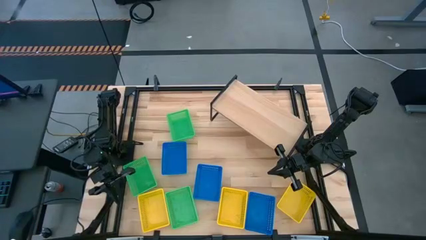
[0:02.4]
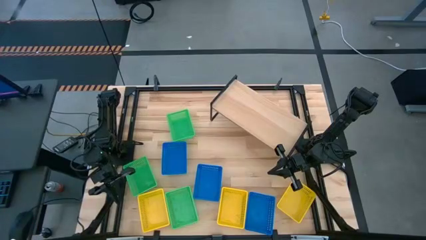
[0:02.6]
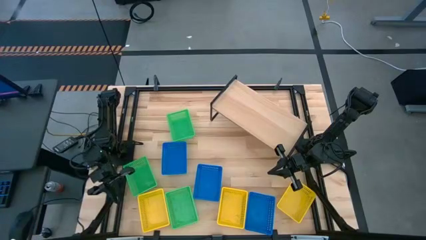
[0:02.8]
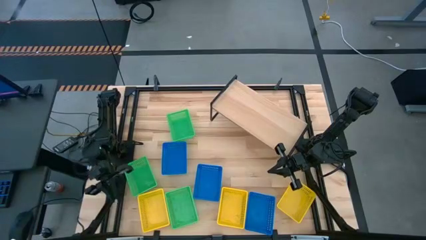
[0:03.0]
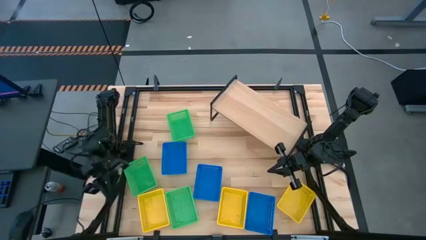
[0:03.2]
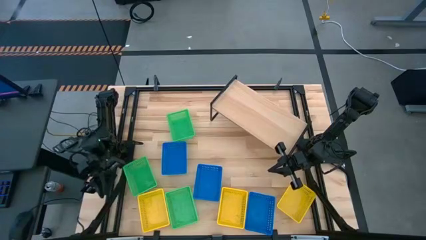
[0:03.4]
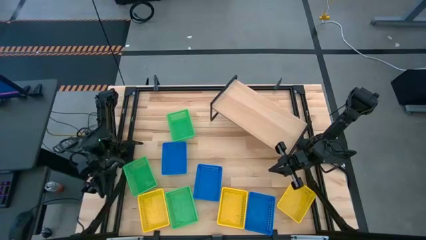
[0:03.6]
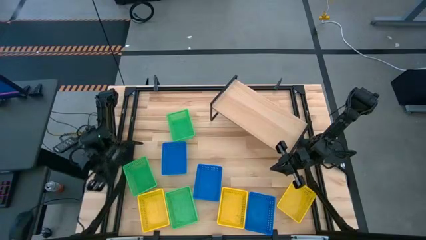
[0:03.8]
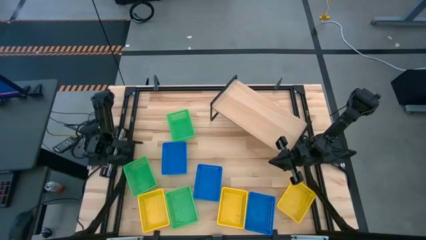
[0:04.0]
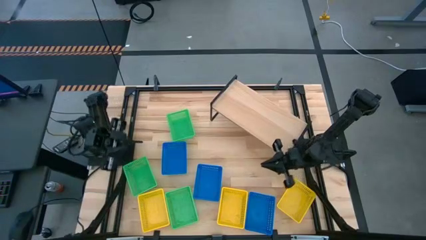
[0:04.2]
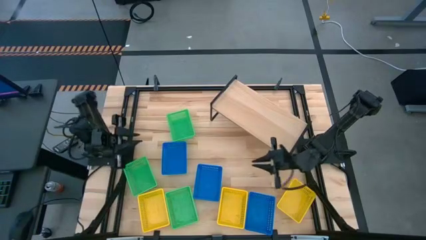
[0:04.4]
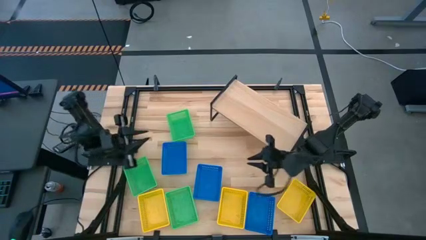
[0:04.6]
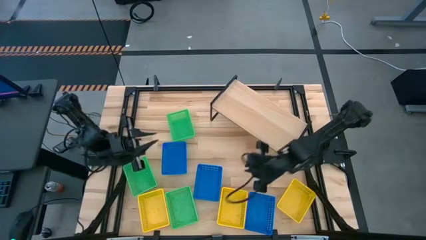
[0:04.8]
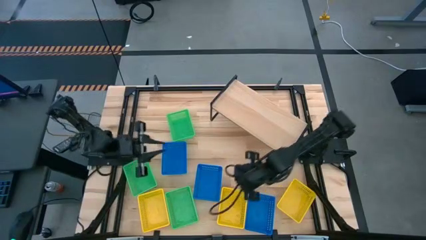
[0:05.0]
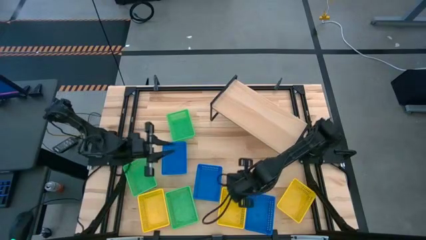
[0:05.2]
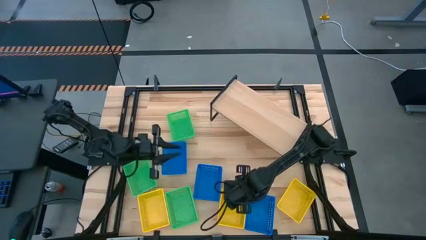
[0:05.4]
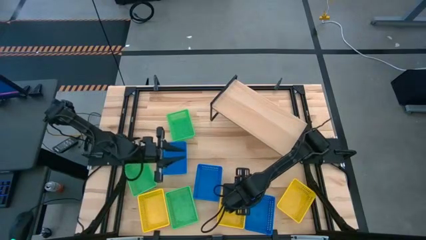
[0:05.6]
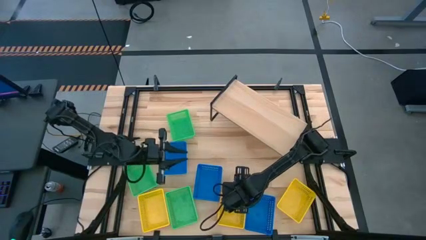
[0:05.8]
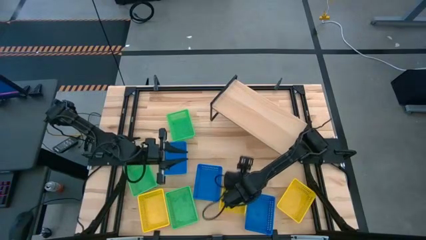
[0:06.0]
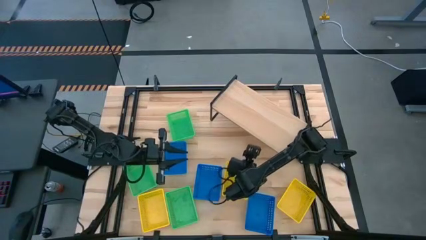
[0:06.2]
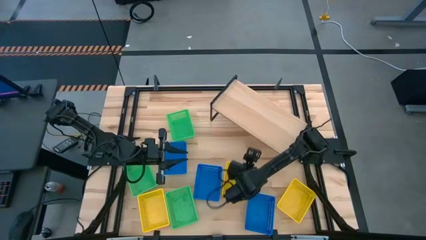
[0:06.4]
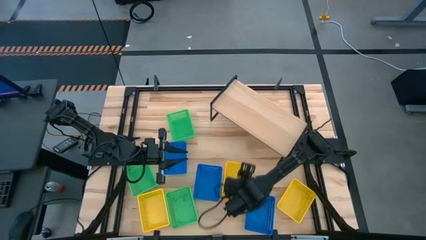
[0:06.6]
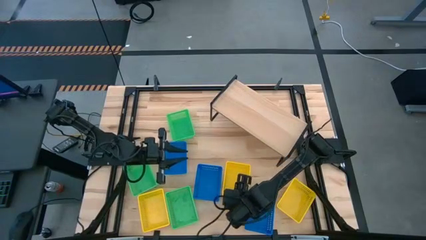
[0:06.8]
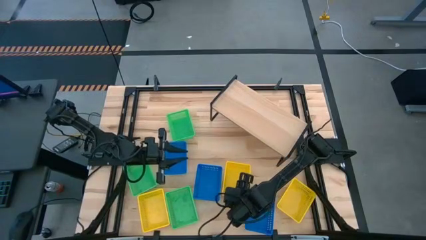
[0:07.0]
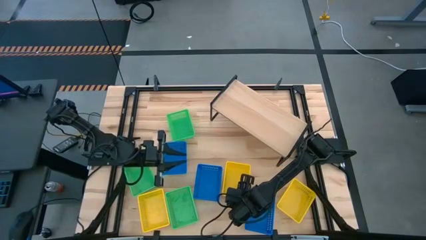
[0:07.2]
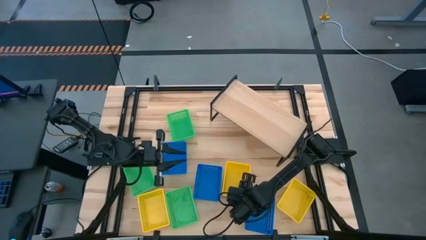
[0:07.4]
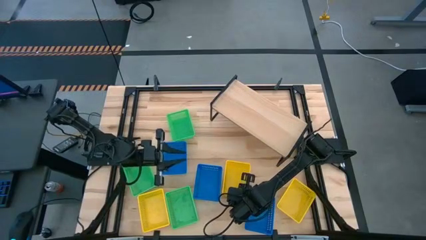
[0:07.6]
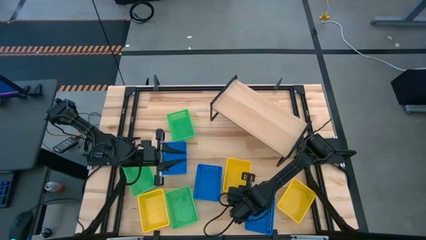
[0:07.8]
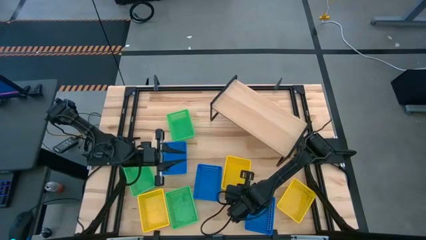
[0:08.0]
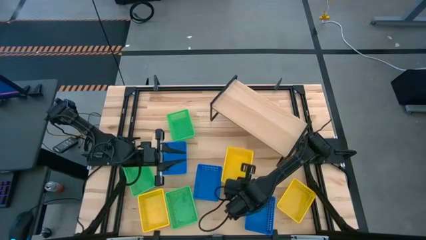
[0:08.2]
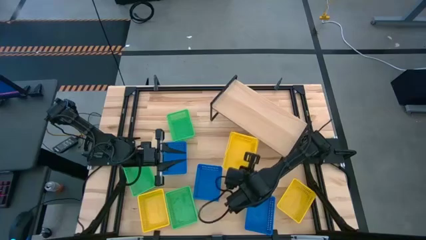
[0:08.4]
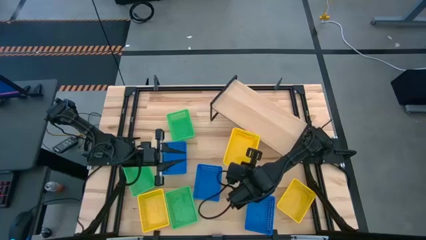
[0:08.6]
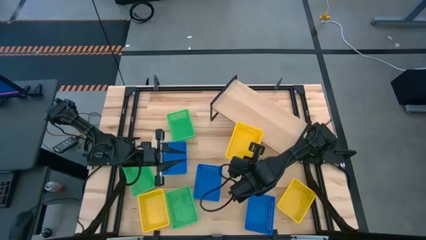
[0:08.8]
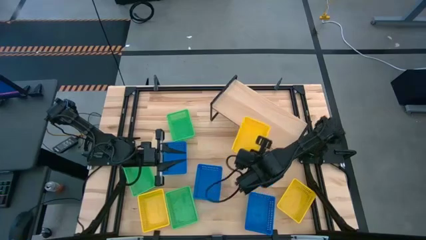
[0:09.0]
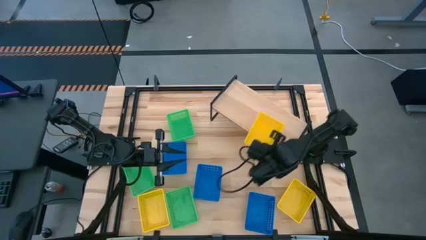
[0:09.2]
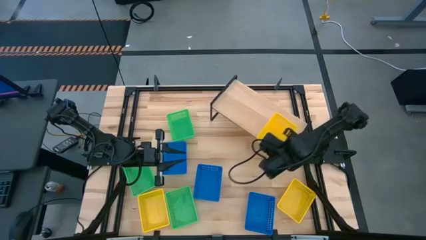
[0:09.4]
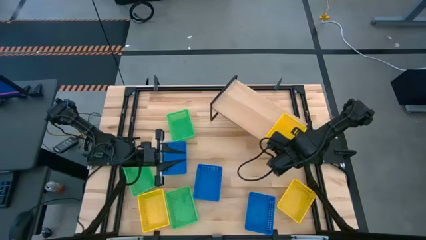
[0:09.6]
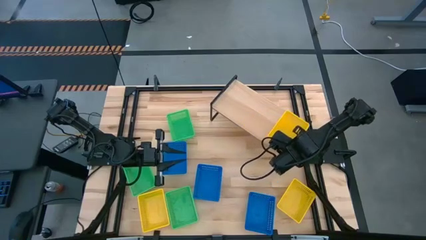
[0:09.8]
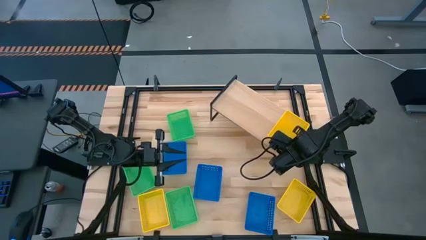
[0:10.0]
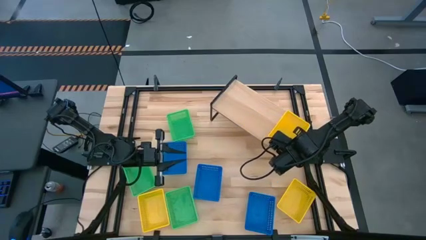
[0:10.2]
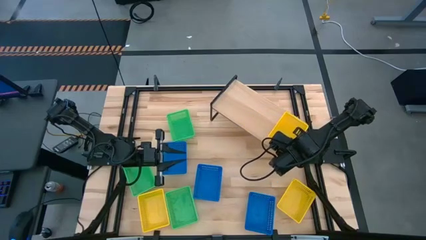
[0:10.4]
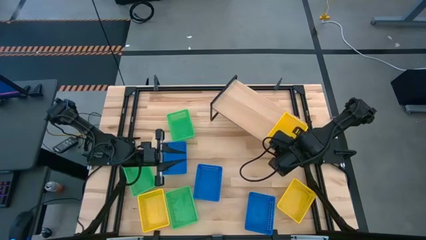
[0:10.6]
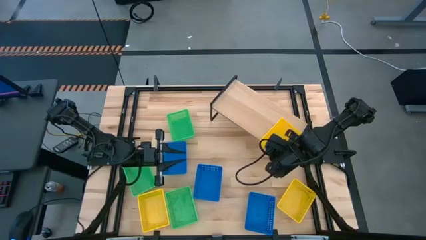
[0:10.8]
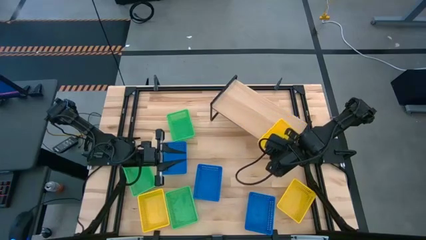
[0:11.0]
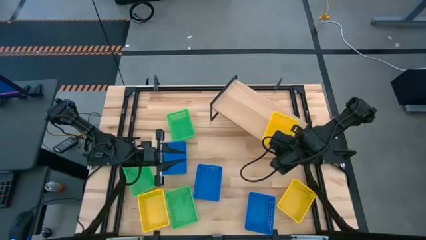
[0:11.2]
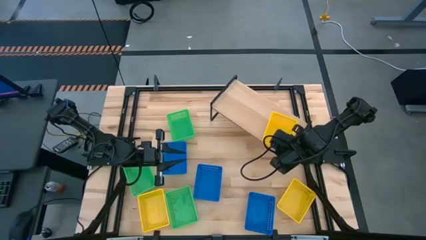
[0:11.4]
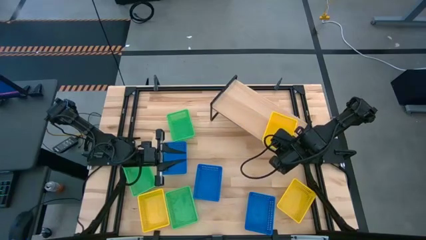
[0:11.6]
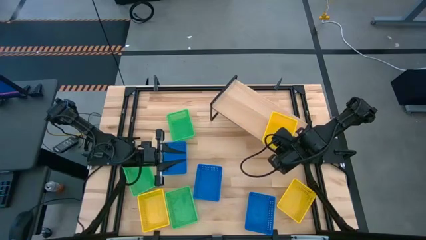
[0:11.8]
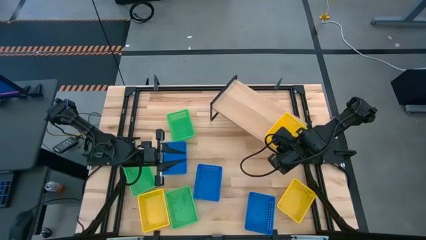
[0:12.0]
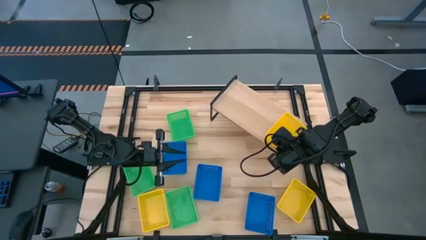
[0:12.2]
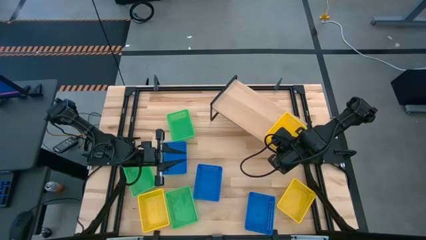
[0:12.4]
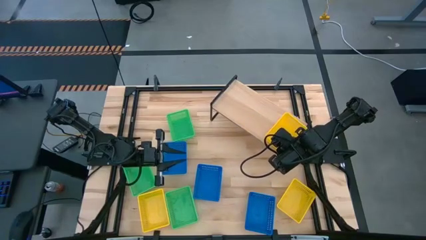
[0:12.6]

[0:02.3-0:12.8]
Task: Stack baskets on shelf by color
Put the middle yellow bin on the shelf

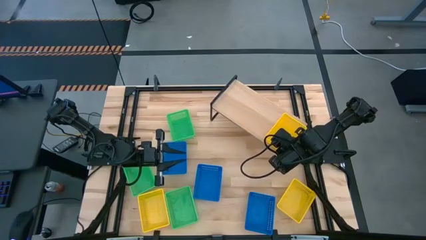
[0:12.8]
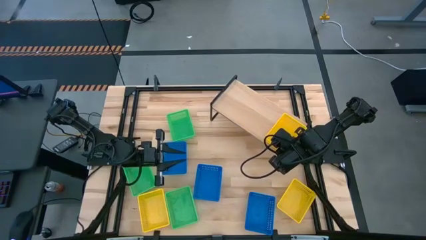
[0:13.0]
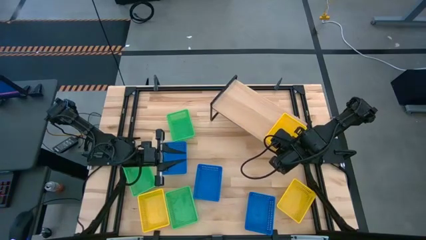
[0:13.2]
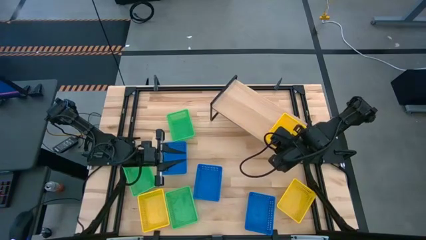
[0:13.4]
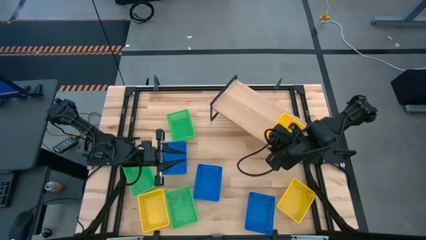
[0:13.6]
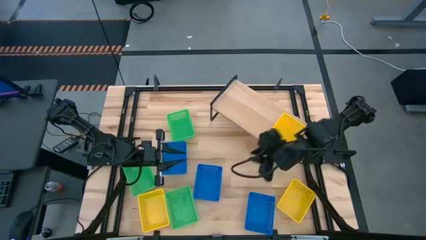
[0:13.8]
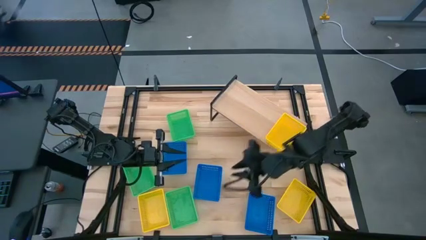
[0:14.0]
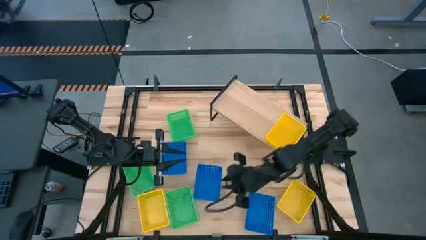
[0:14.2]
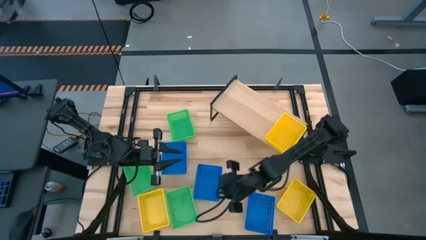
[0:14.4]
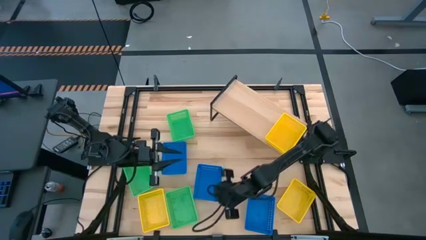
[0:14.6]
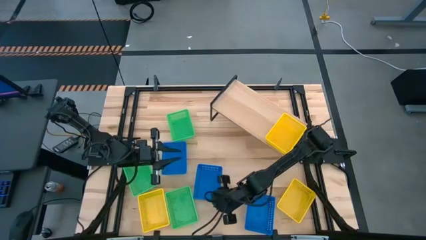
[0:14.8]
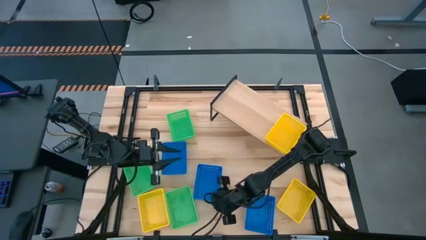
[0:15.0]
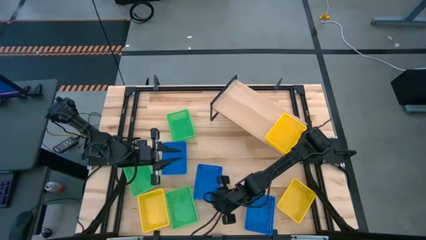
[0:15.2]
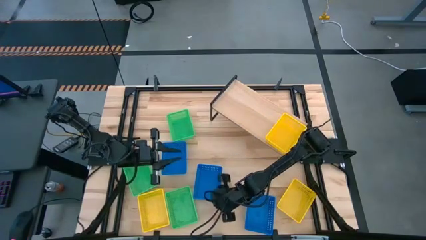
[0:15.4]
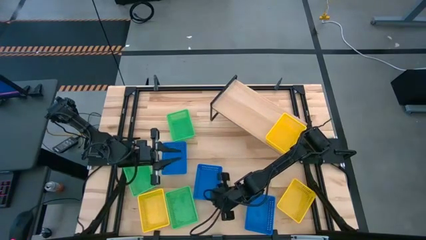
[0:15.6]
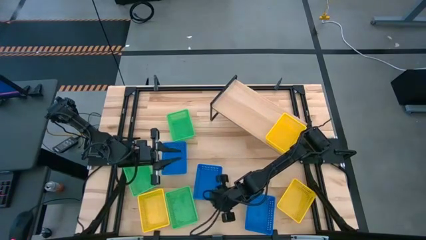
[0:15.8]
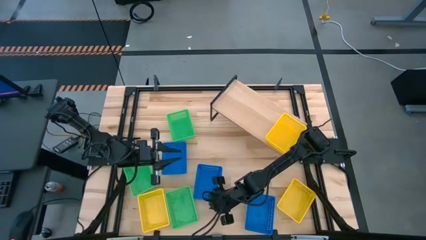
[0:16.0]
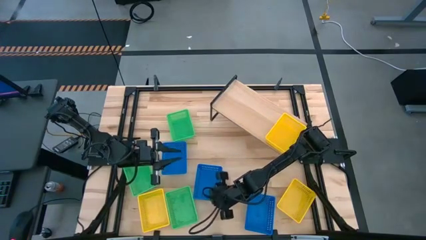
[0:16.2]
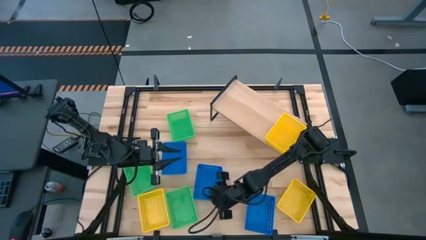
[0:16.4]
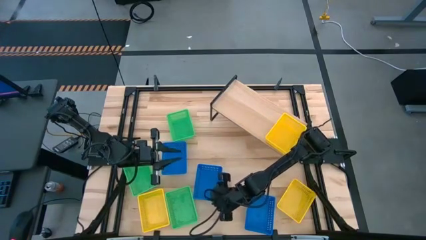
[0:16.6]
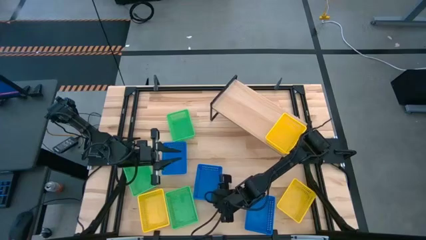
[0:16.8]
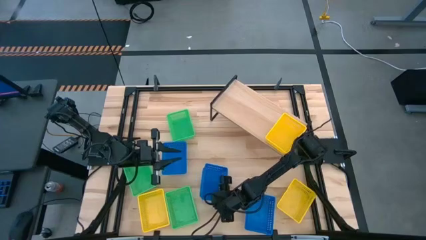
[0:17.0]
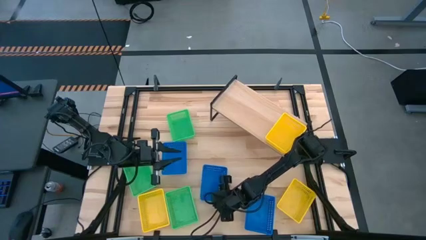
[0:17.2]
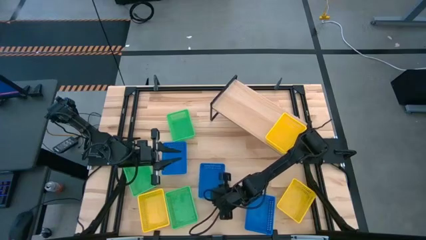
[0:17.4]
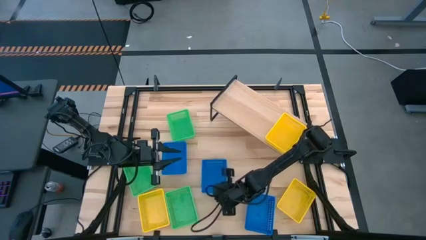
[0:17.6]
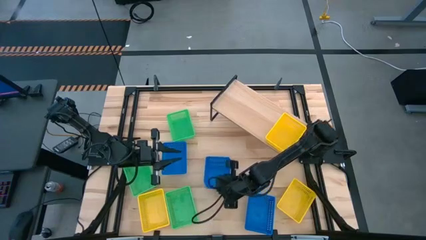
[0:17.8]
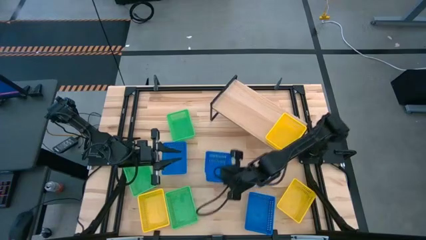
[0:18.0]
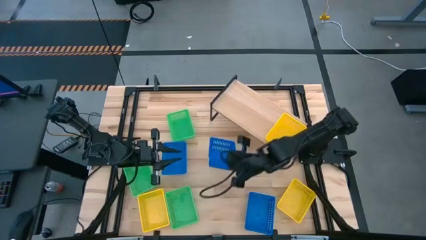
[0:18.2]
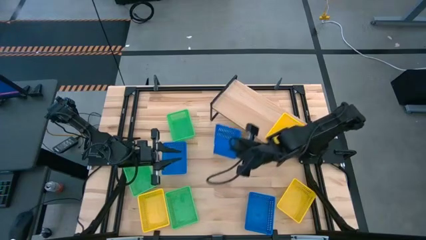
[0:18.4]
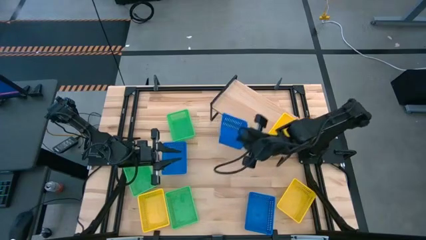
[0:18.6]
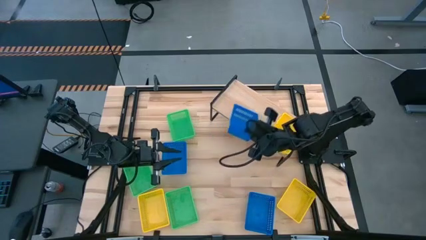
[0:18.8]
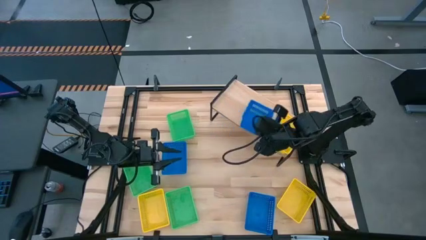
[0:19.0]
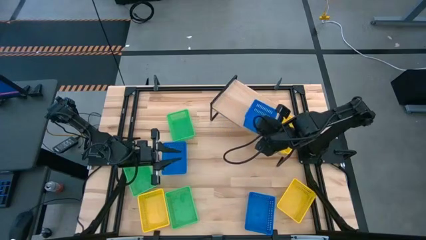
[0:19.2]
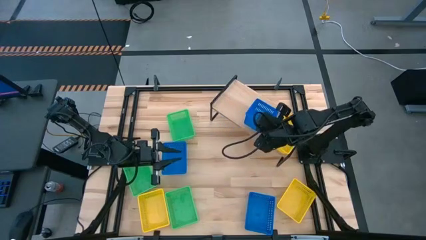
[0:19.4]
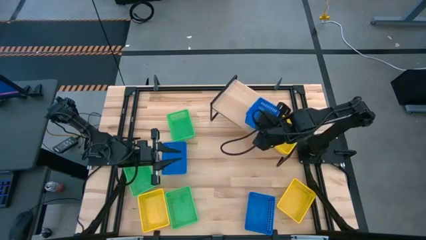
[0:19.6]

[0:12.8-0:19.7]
Put the middle blue bin on the shelf
